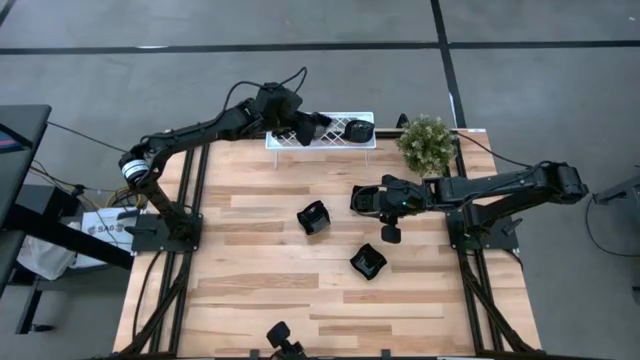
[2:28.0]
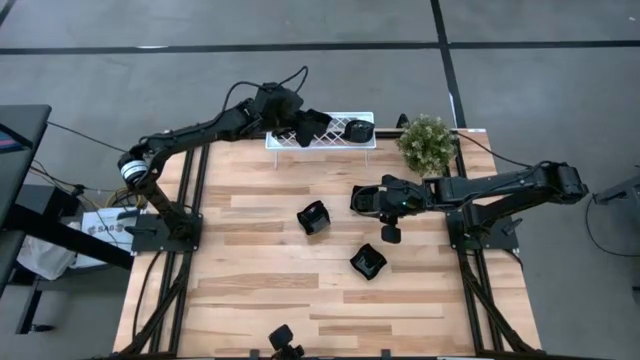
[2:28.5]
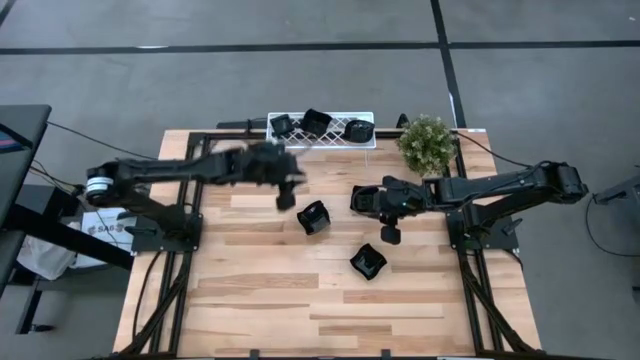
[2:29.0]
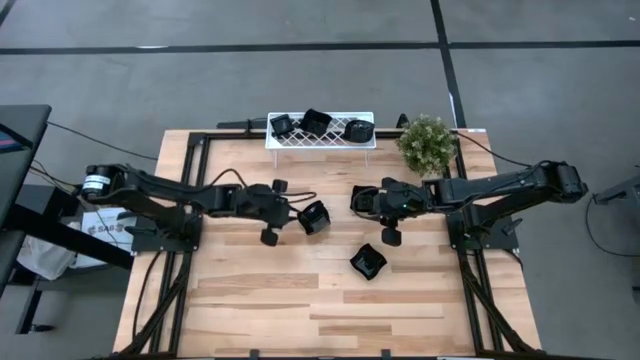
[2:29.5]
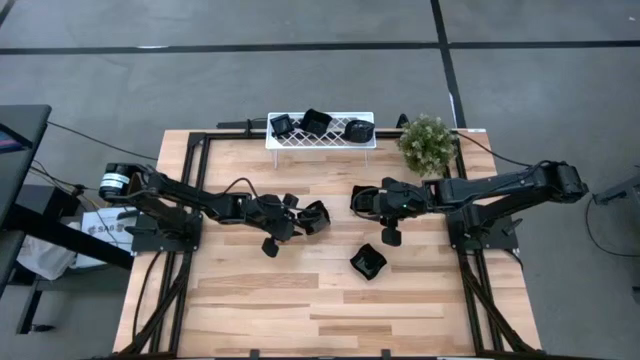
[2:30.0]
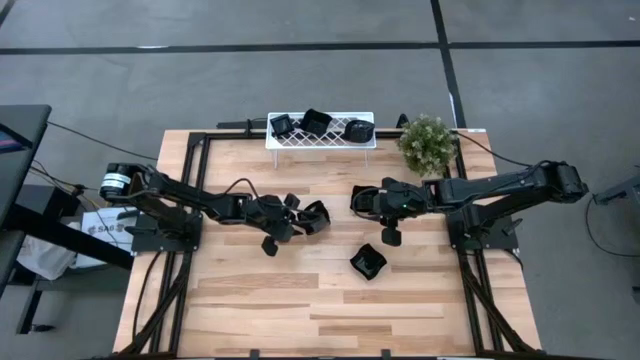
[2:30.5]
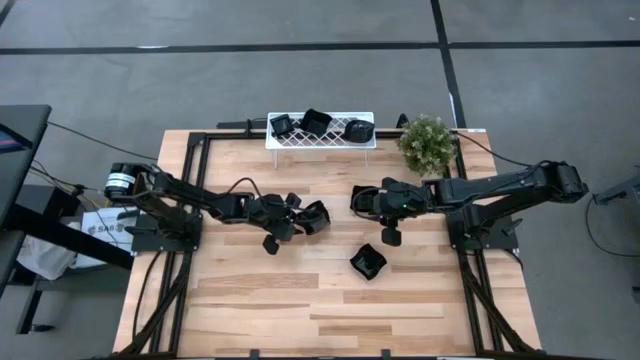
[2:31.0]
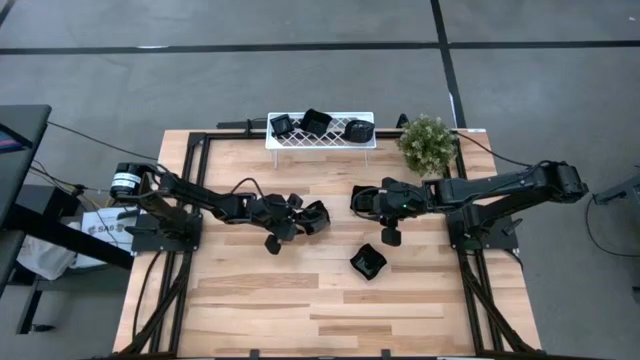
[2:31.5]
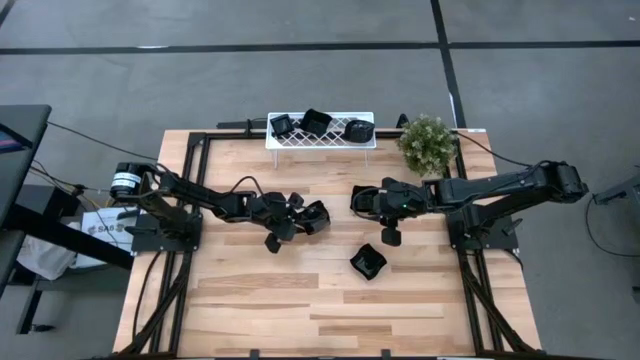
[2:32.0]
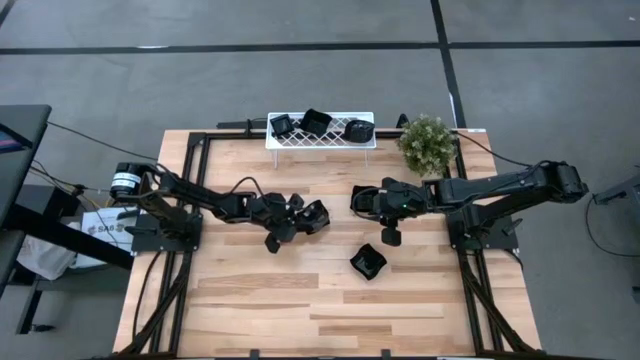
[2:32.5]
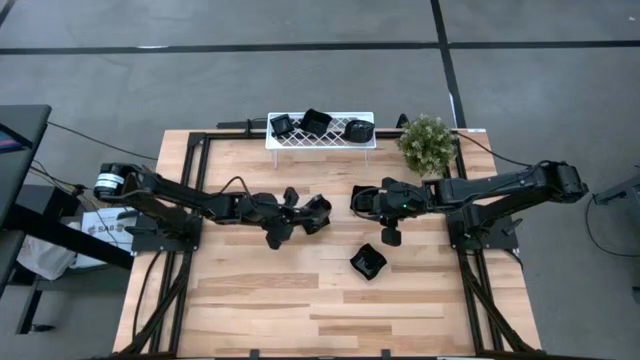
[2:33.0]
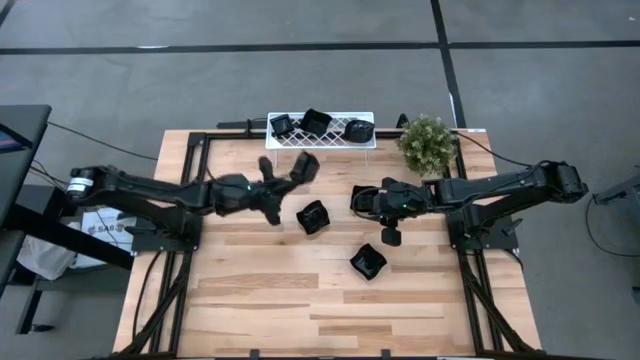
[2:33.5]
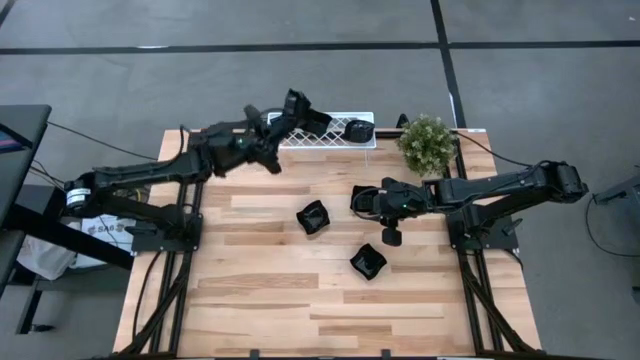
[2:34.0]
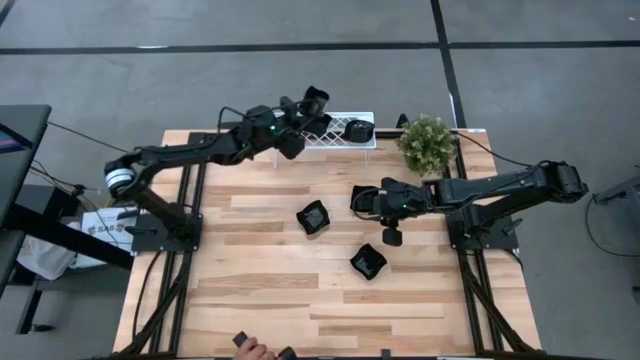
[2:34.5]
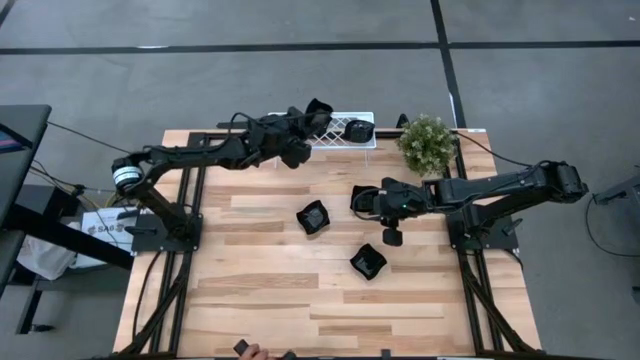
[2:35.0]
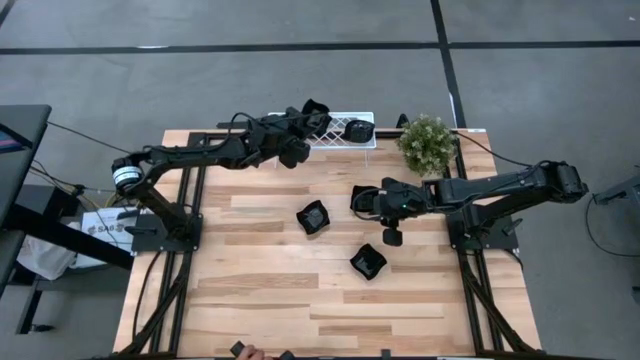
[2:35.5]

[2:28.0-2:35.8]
Task: Pick & Place Mini shaped plates
Stack the black distorted square plate on top of the black distorted square plate on the shelf

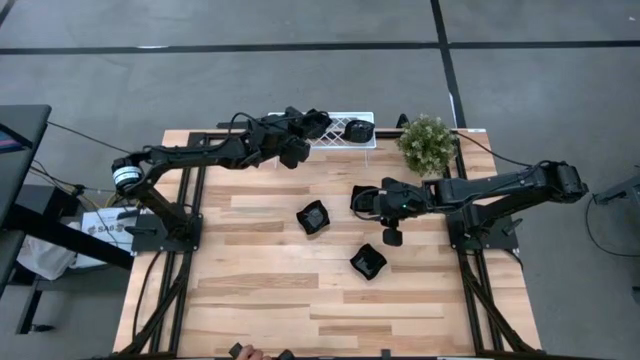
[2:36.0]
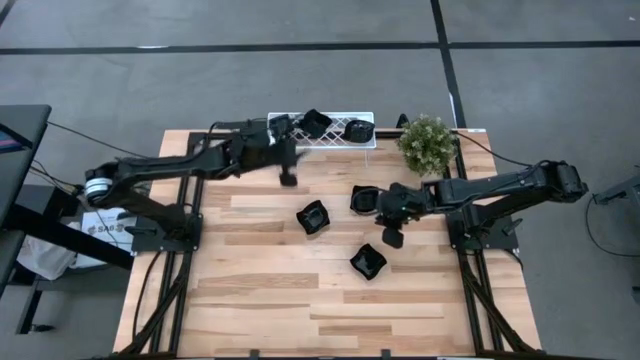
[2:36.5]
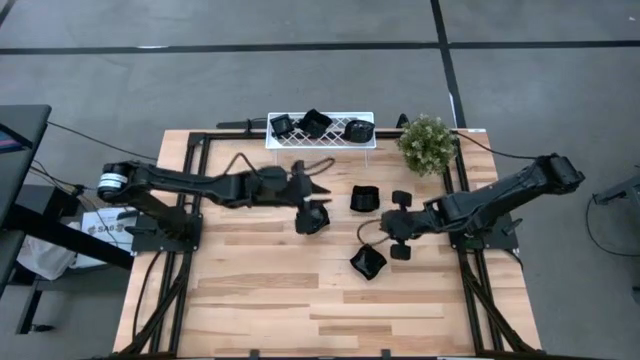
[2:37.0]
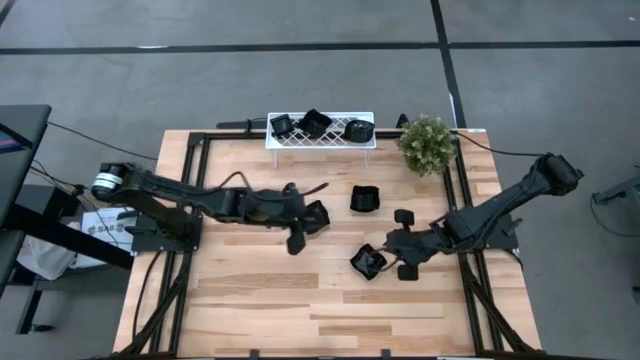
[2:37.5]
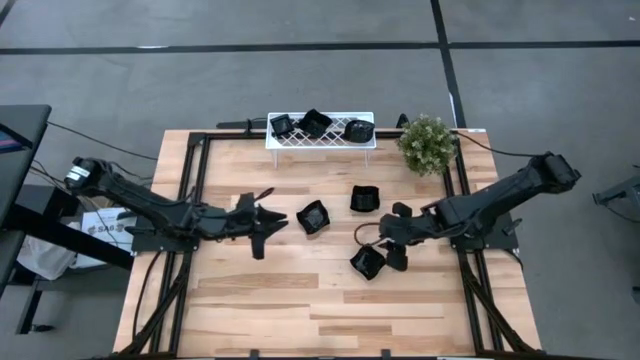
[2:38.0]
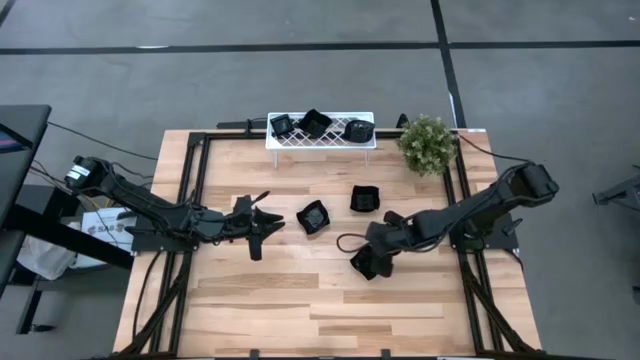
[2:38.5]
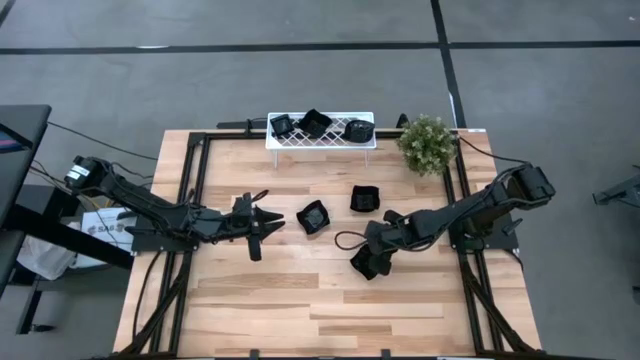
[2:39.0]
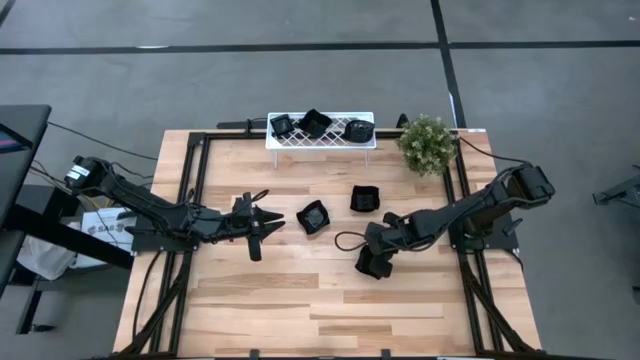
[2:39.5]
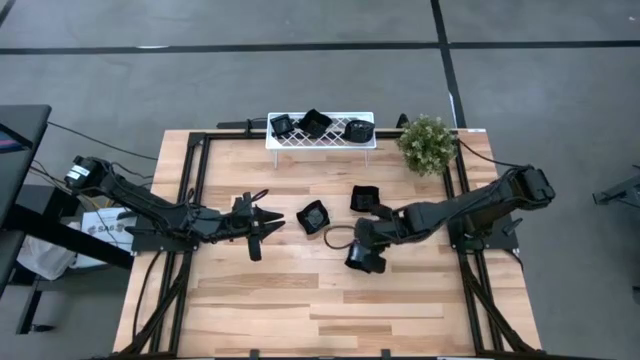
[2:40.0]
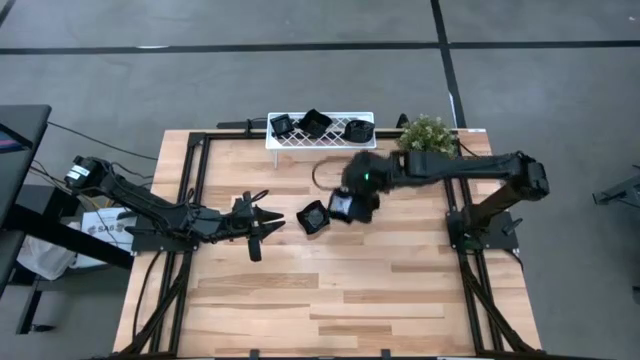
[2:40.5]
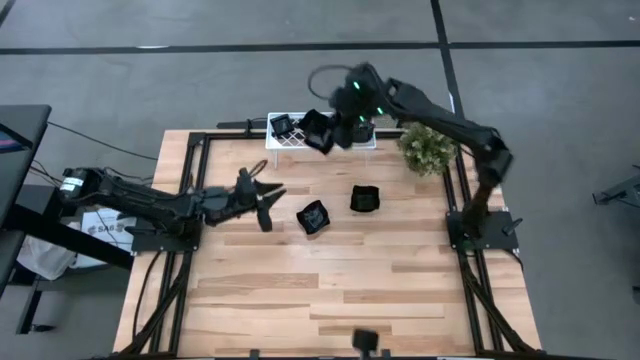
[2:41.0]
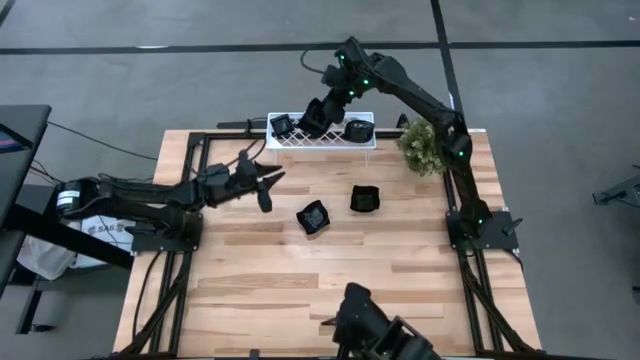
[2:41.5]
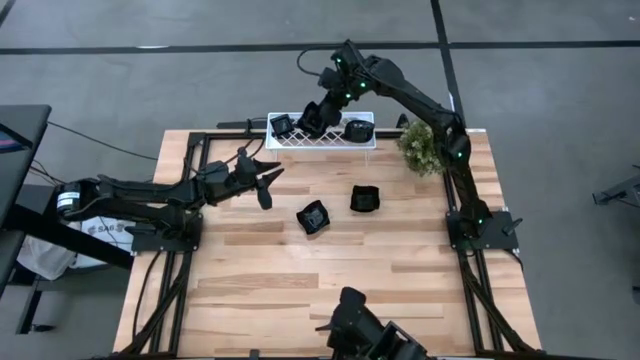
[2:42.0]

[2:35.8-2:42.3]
Stack the black distorted square plate on top of the black distorted square plate on the shelf

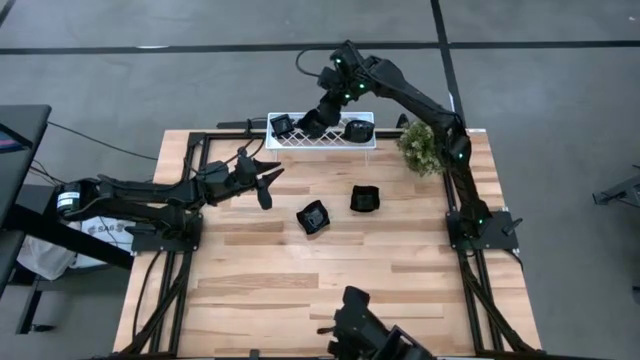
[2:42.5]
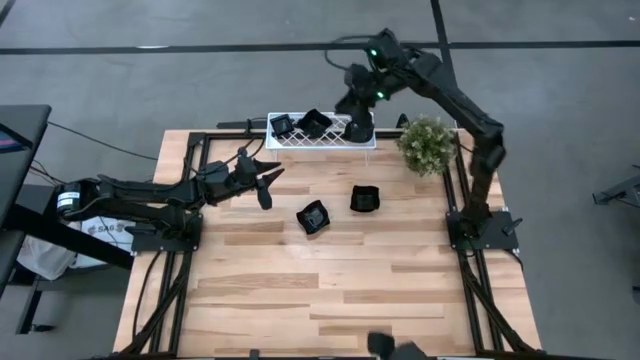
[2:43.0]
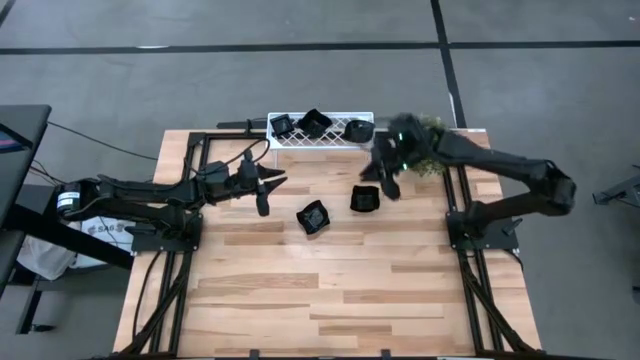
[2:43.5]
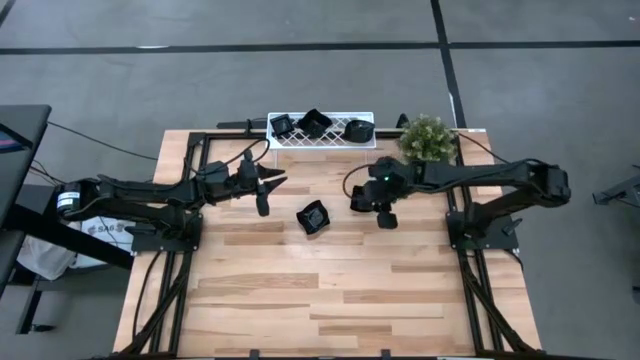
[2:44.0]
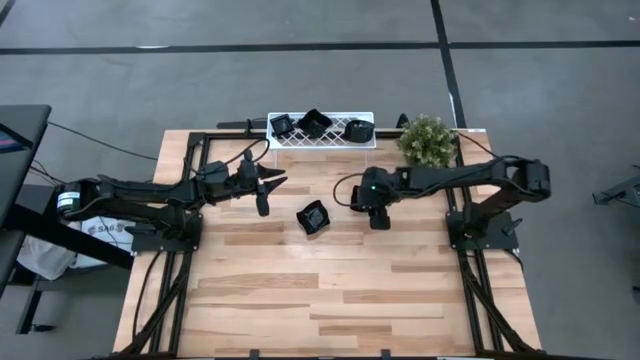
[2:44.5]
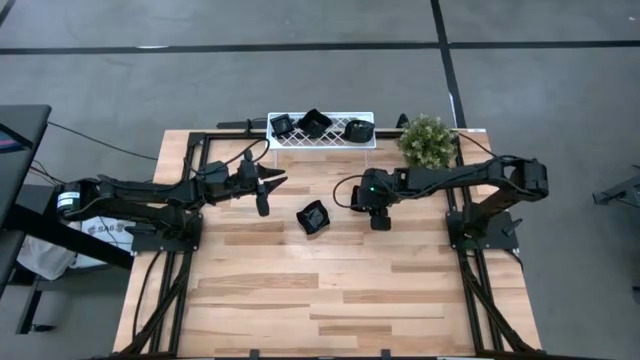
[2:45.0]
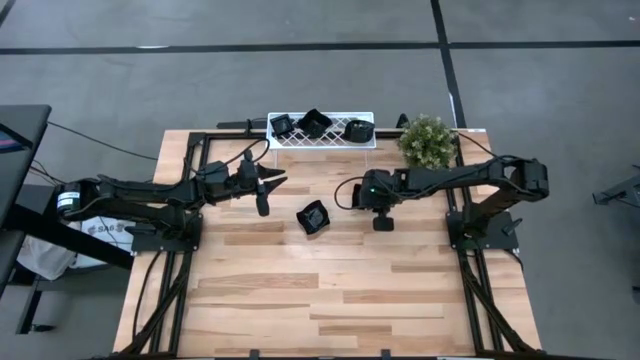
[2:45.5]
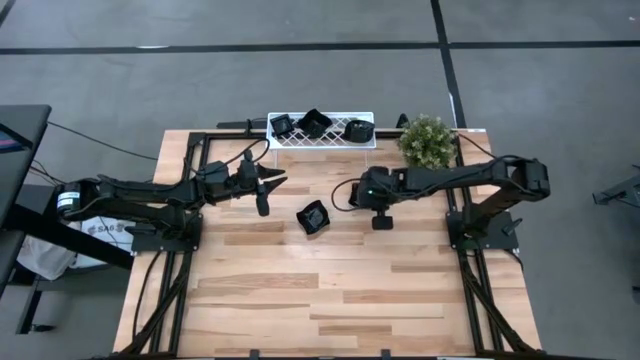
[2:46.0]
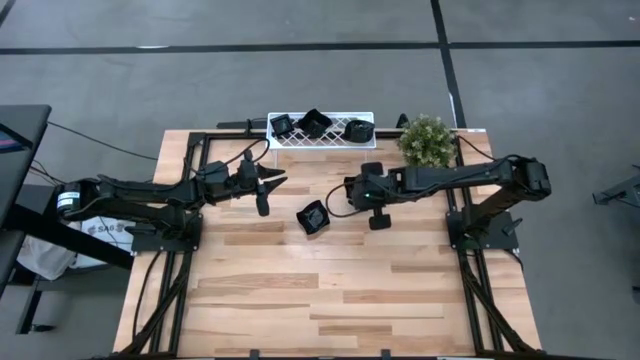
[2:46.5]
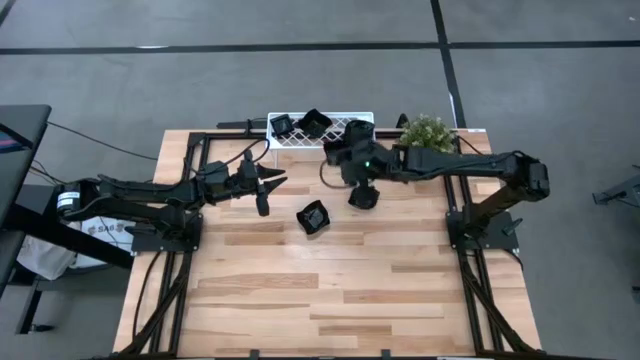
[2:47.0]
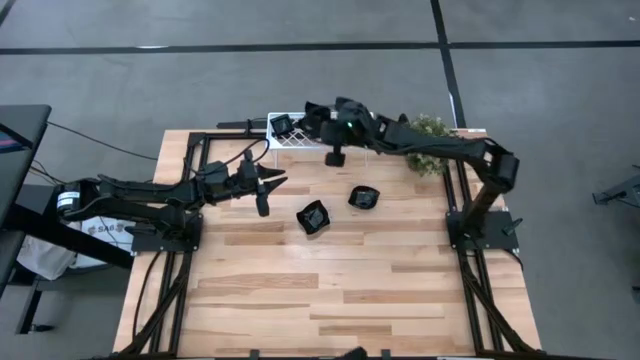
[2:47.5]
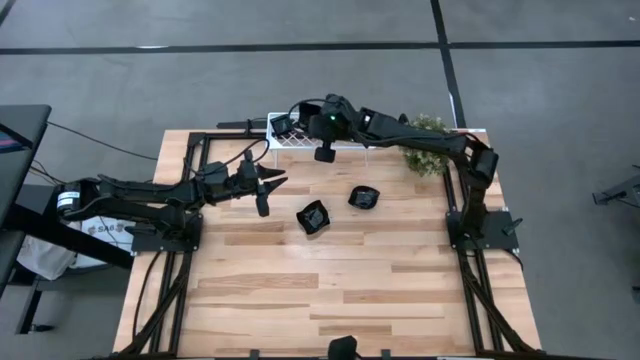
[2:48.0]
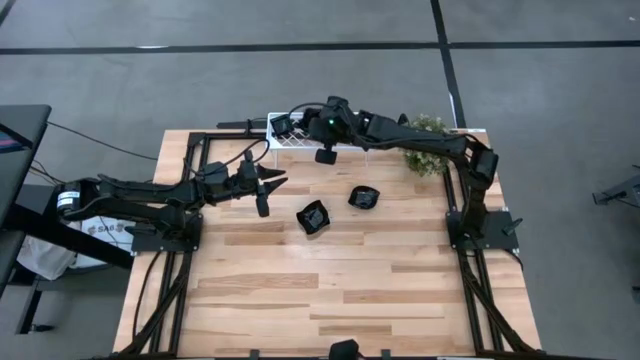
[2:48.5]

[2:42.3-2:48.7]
Stack the black distorted square plate on top of the black distorted square plate on the shelf
